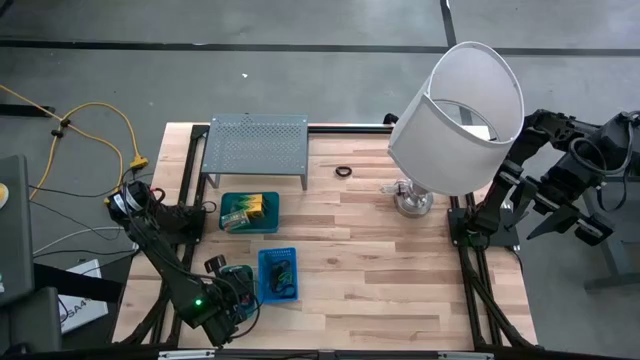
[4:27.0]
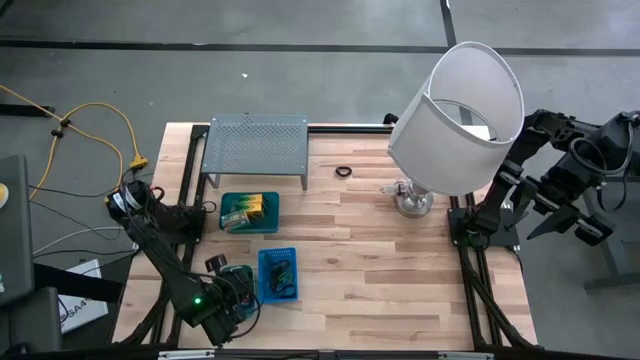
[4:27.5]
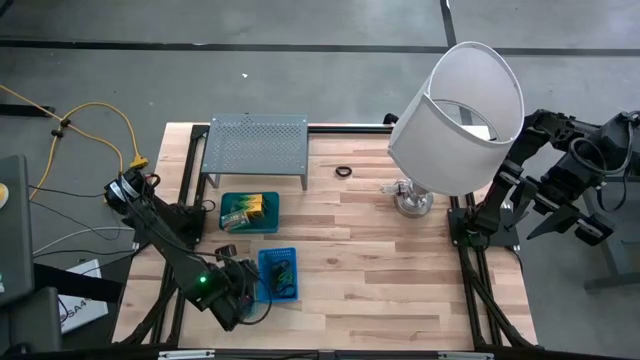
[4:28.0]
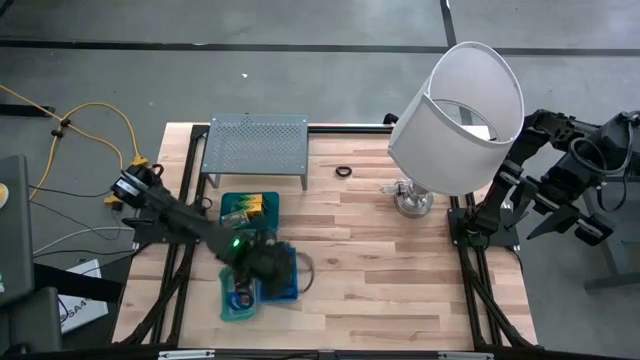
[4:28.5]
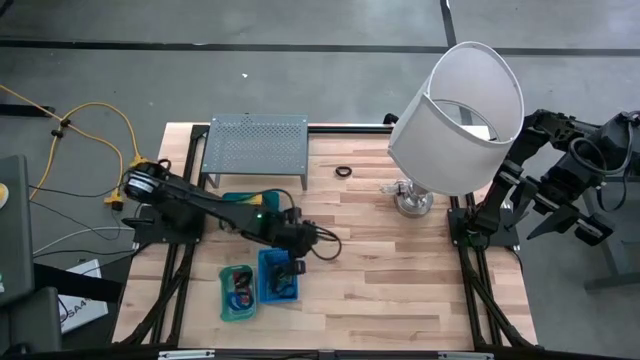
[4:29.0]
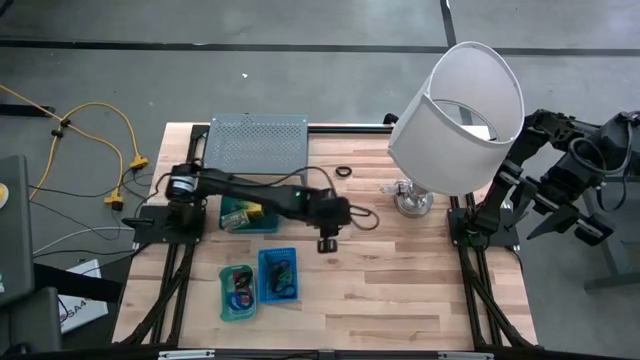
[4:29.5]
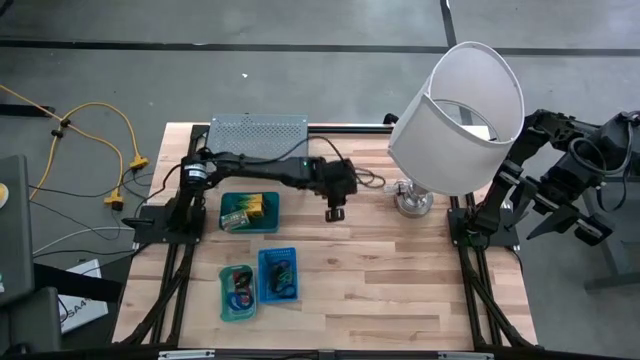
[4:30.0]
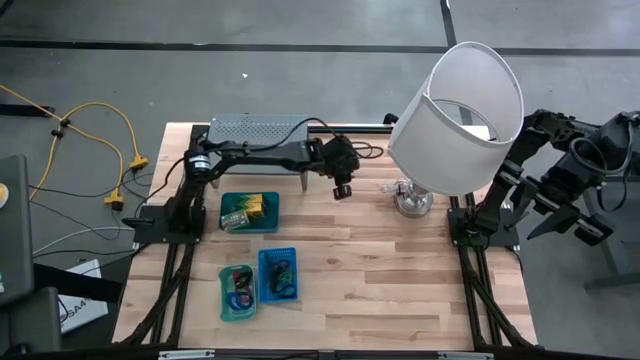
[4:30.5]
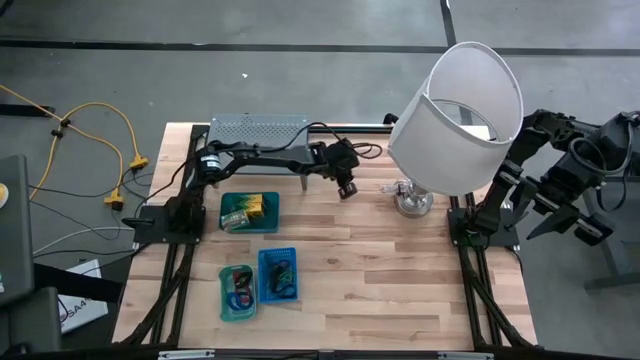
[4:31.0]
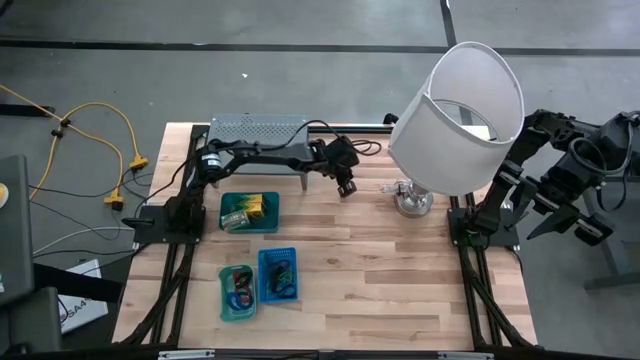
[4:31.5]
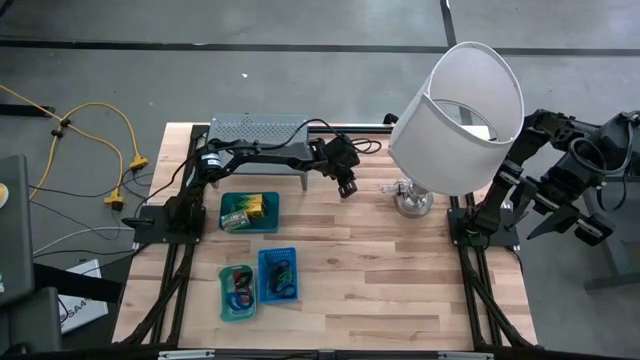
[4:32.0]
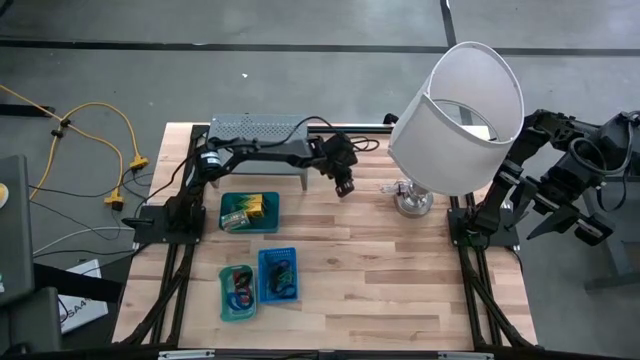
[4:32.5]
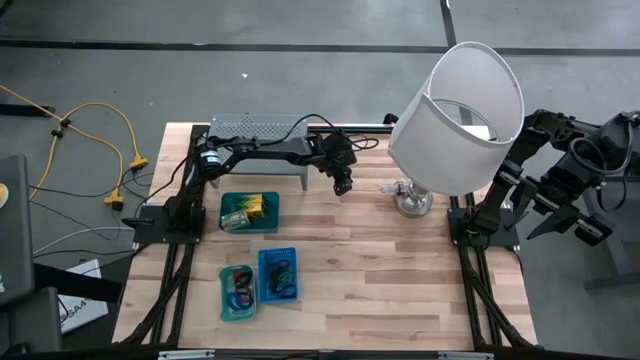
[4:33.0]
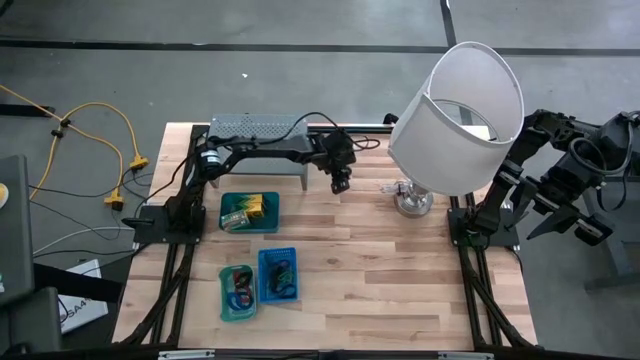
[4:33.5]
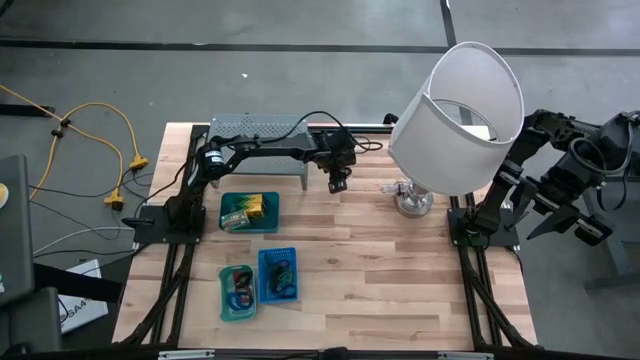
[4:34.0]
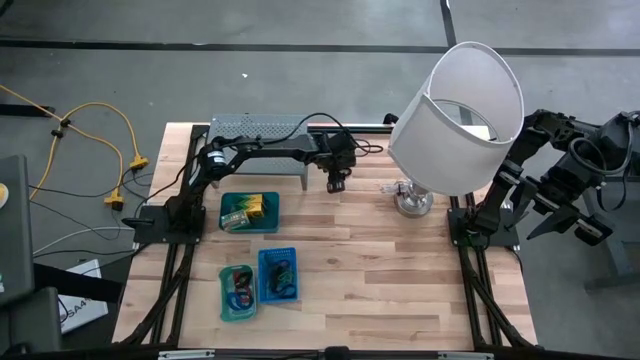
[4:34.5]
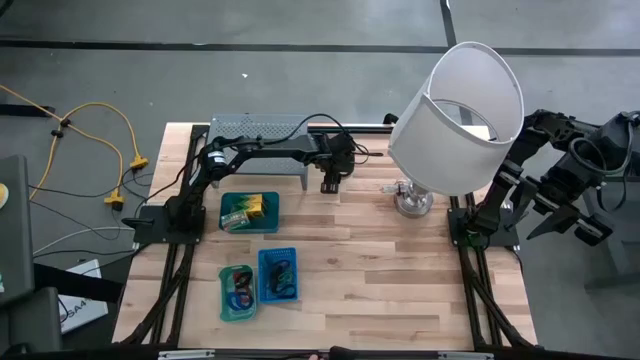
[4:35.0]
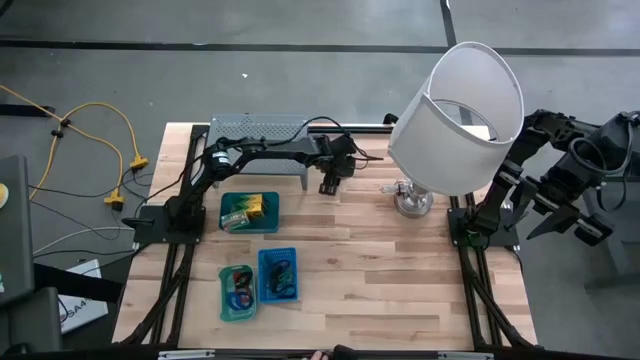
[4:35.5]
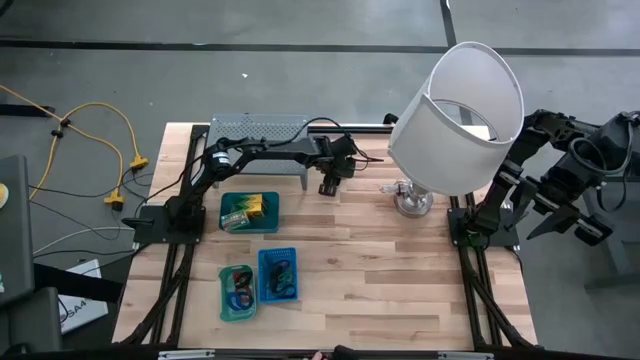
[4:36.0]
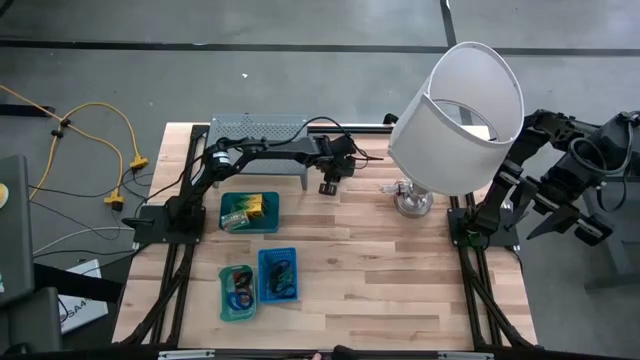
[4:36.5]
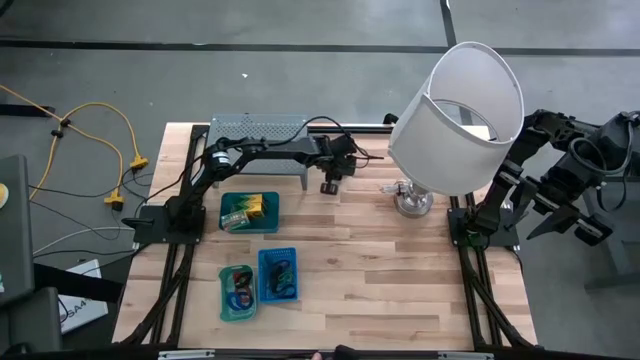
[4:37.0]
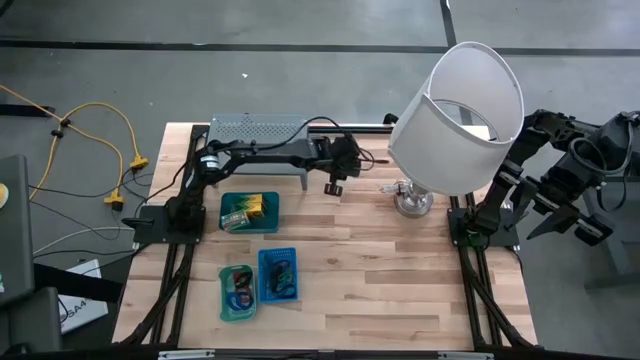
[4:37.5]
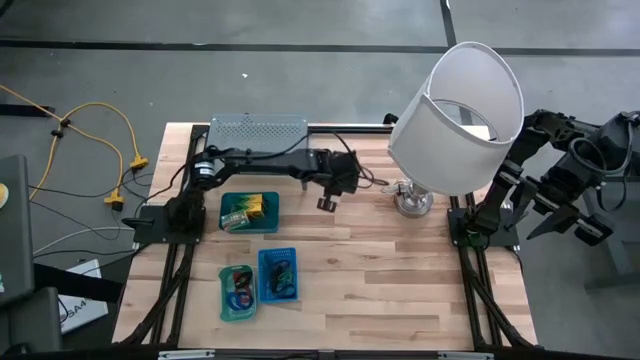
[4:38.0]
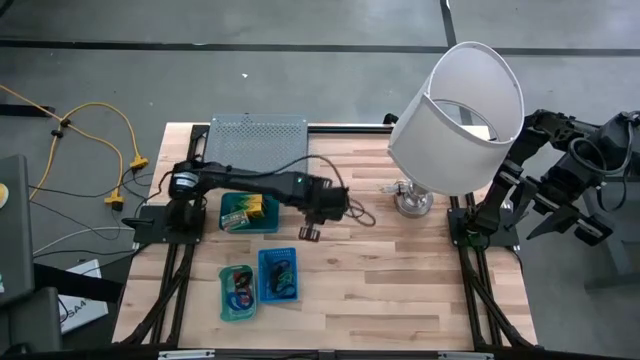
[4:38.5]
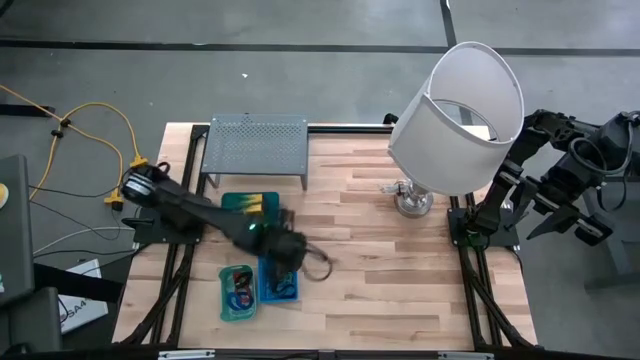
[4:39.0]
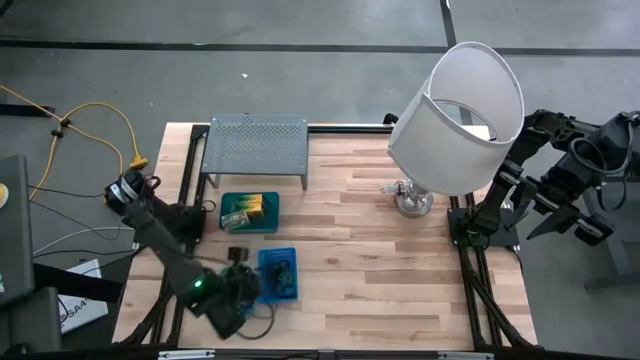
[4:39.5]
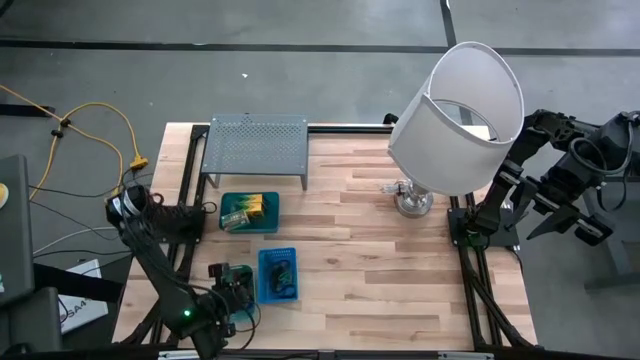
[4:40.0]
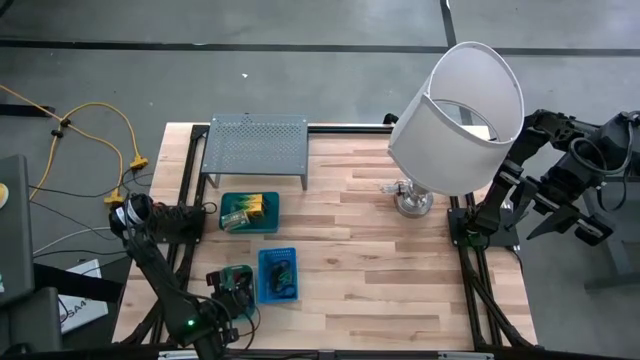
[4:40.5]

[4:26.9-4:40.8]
Task: Pick & Place Office Desk Supplies
Put the black spring keychain into the green bin

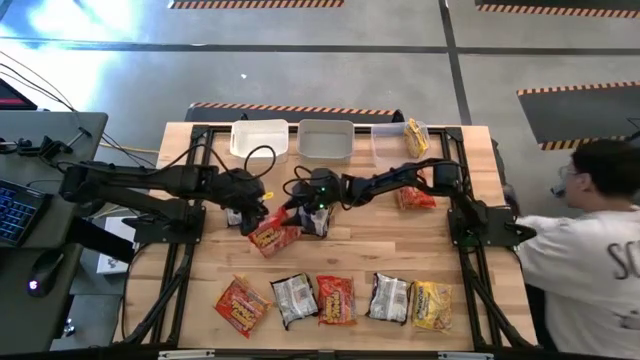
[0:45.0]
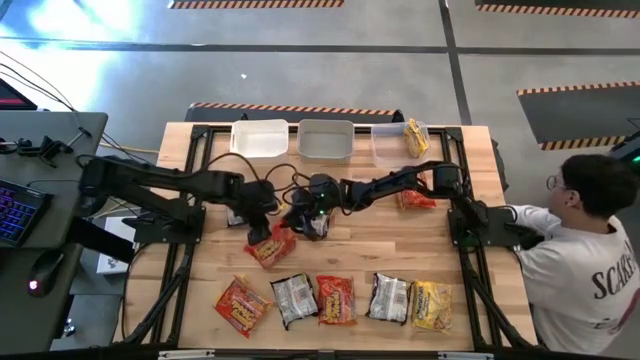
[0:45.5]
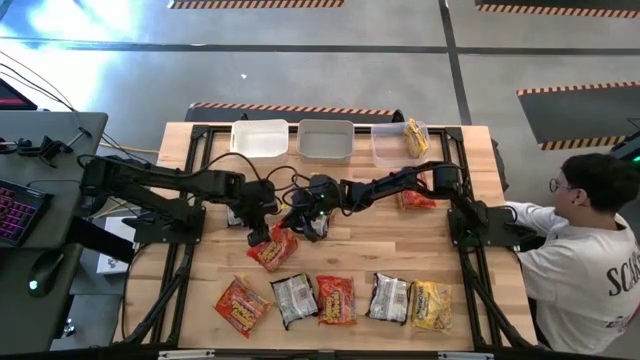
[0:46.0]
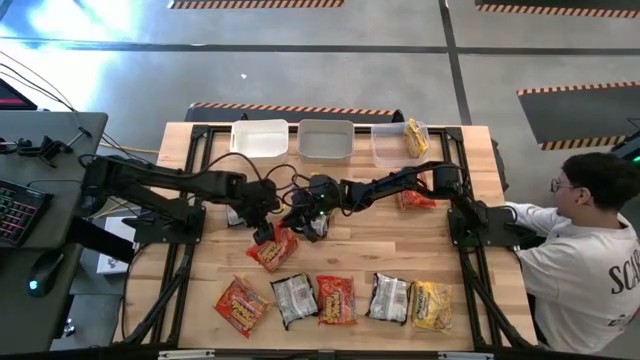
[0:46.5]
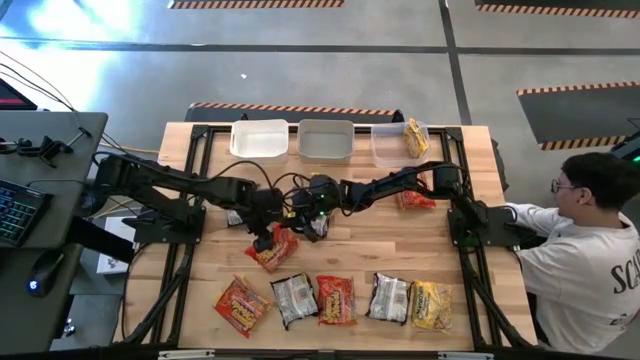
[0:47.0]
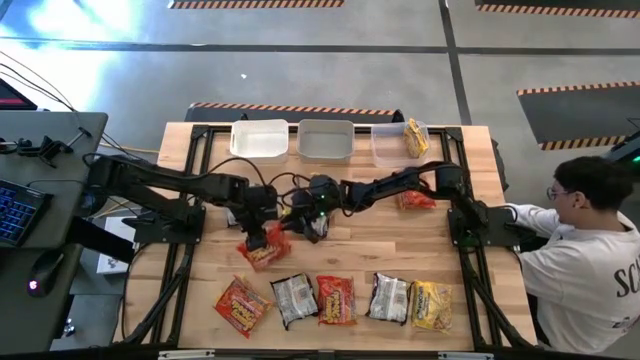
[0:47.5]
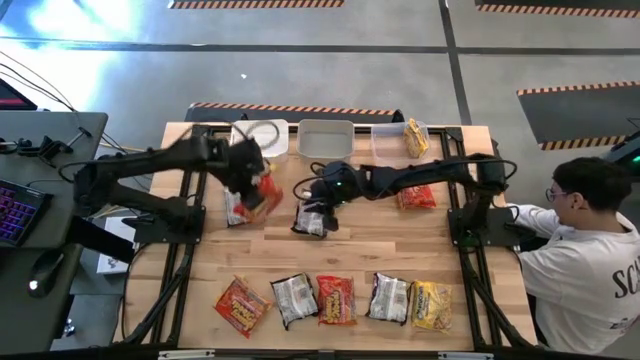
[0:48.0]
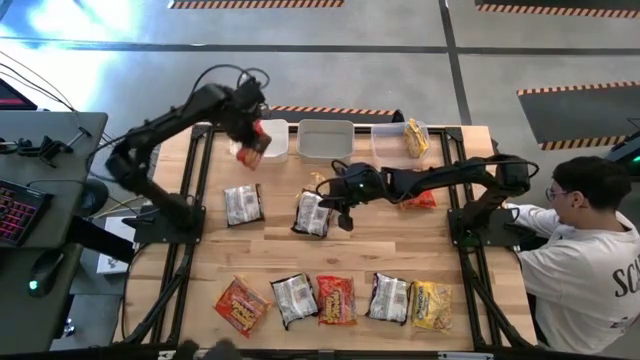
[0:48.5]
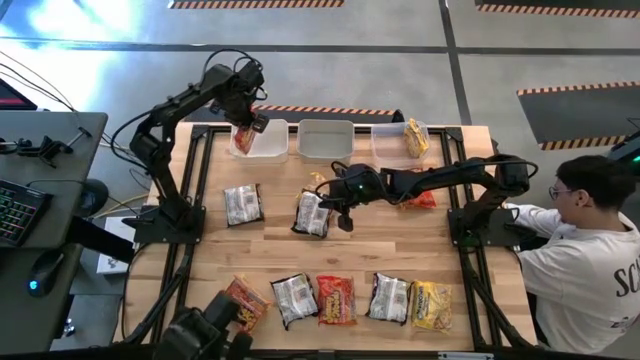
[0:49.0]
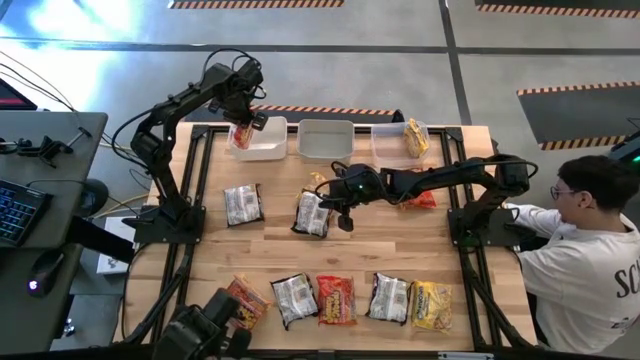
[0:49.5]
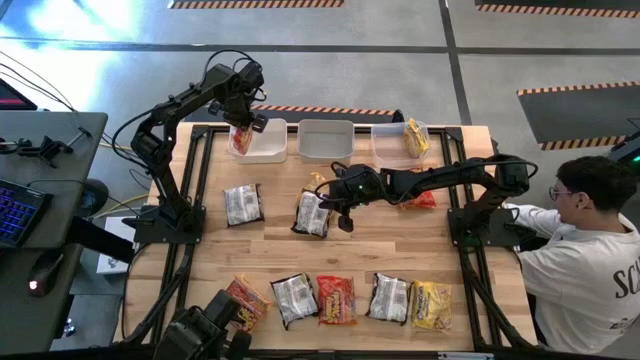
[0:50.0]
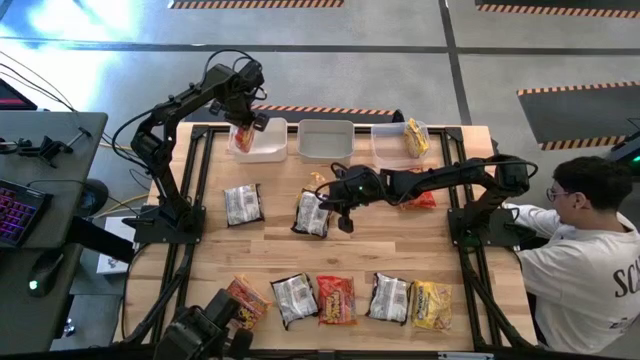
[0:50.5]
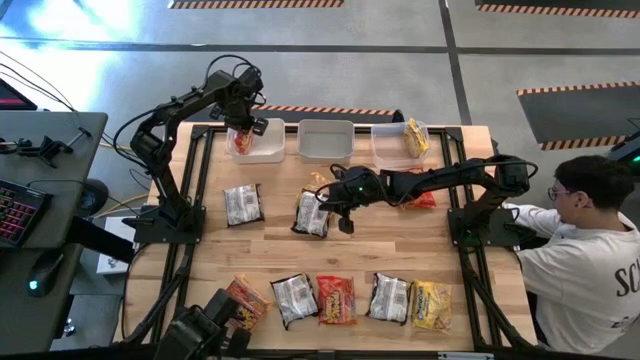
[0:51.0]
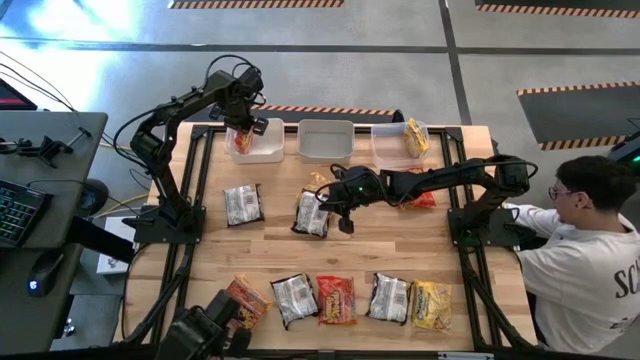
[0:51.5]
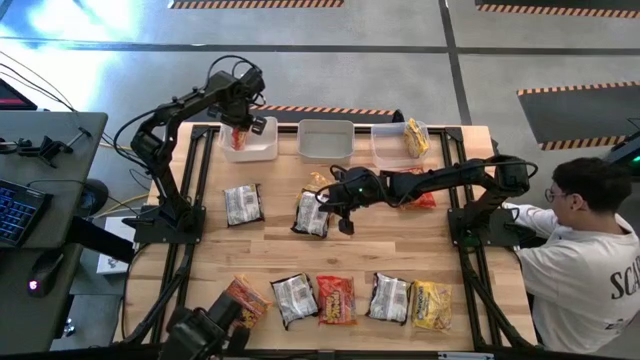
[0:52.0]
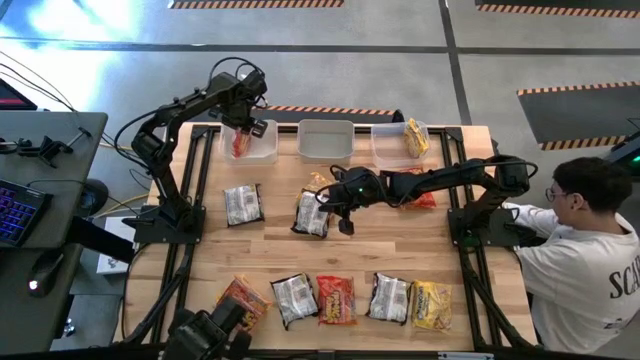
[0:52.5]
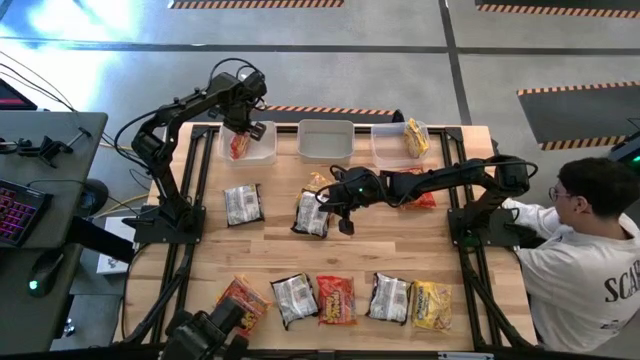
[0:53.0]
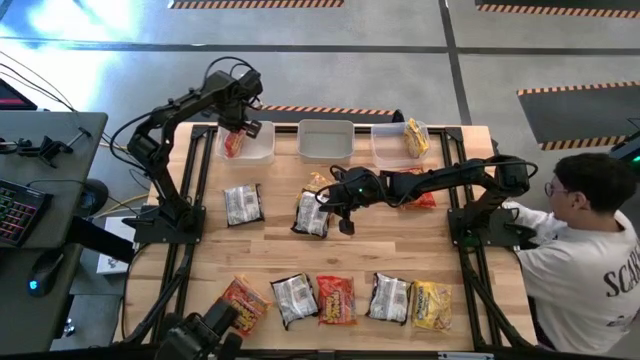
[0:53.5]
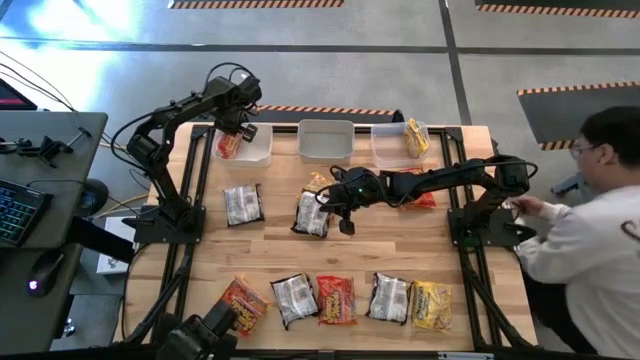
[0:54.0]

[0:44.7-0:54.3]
Task: Sort Maruchan noodles
Put the orange noodle pack into the white bin
